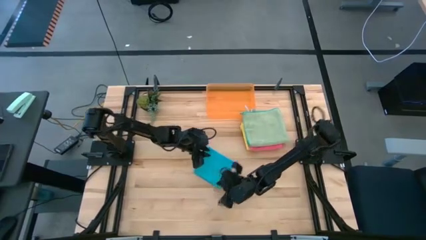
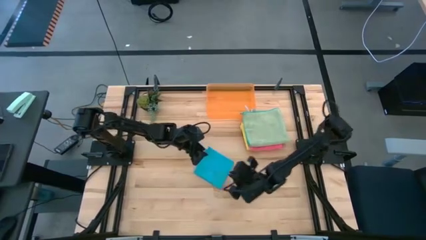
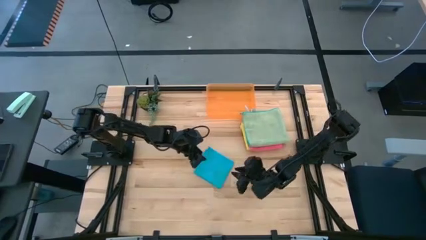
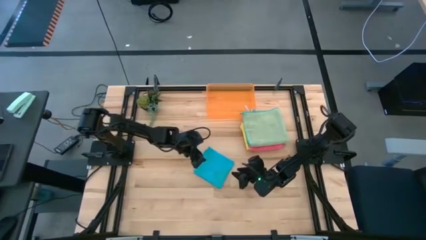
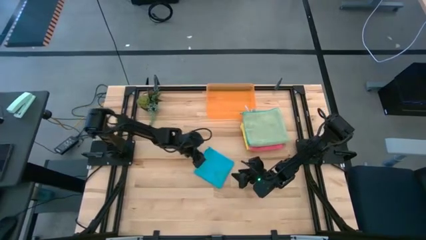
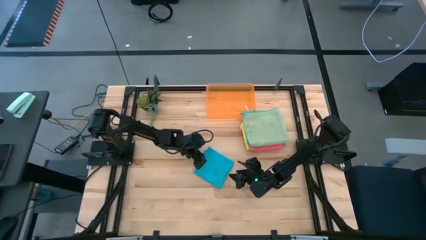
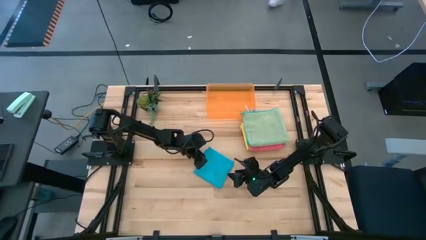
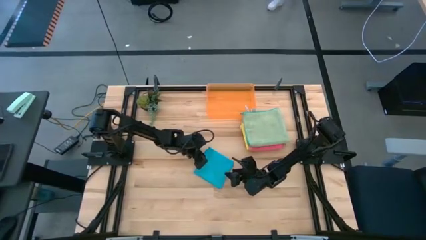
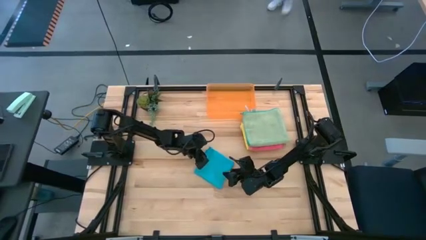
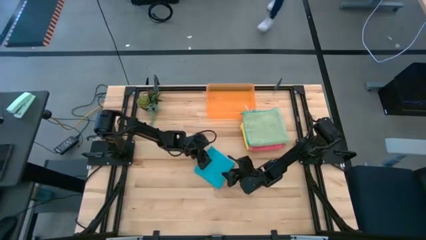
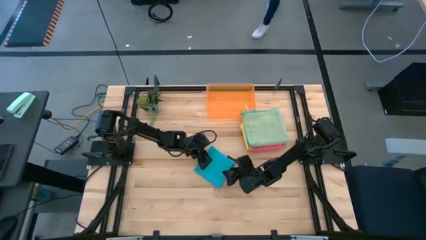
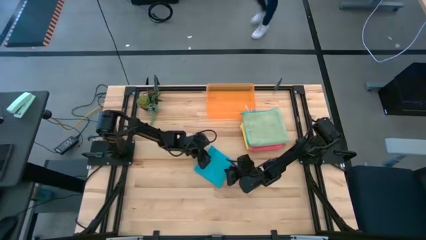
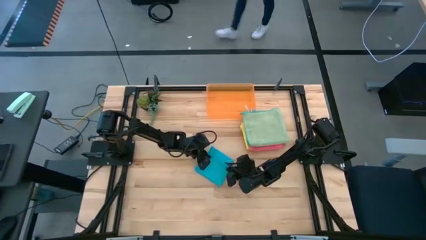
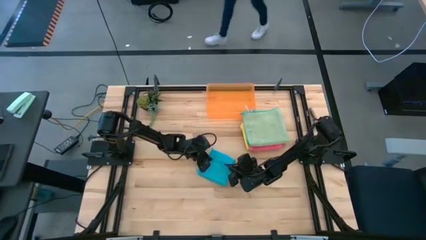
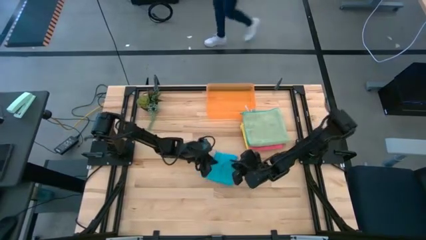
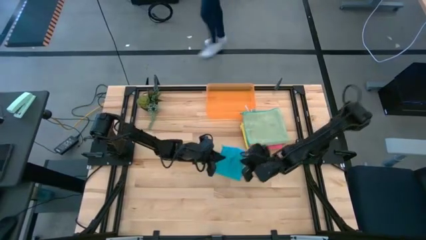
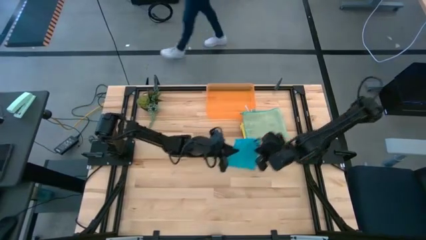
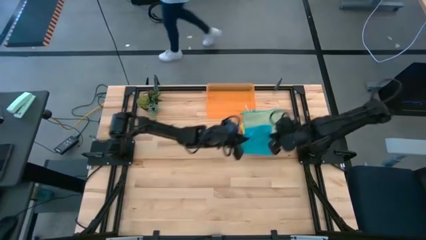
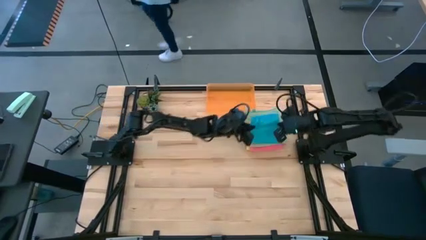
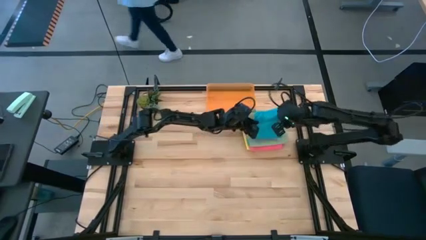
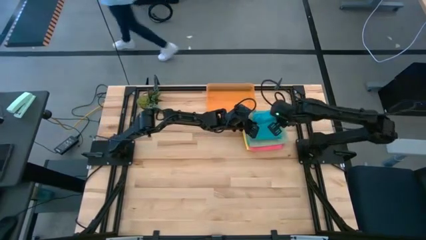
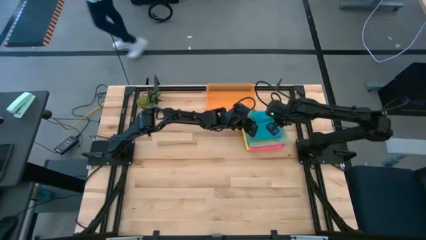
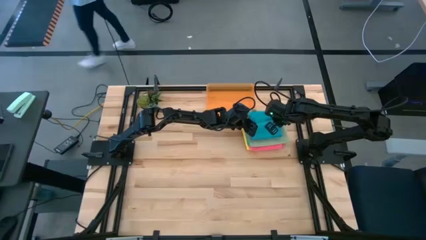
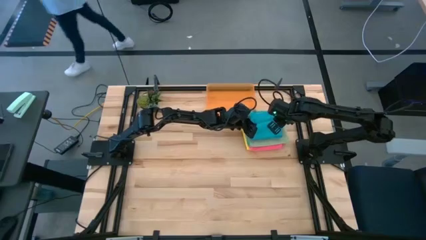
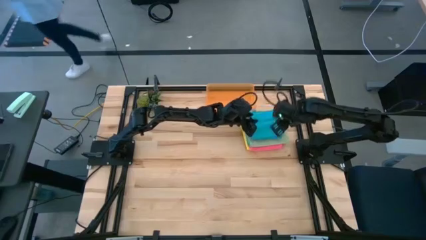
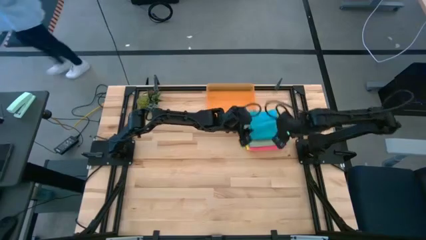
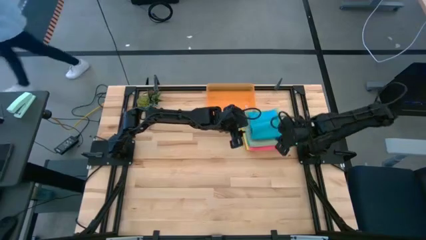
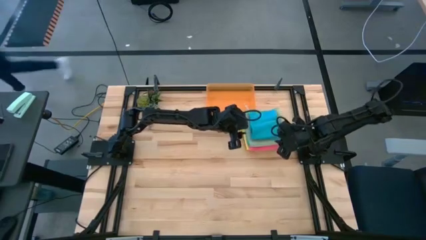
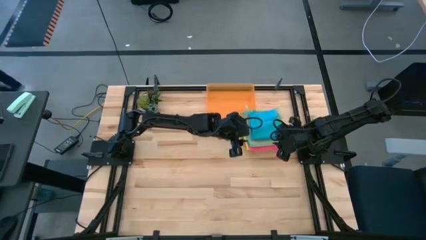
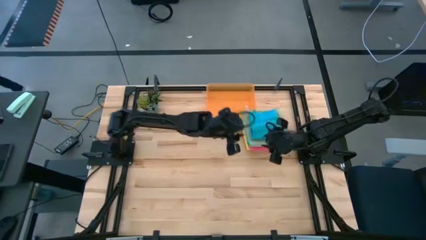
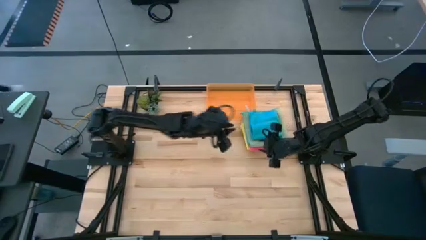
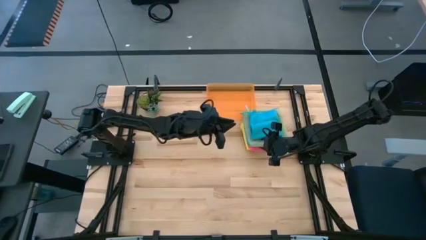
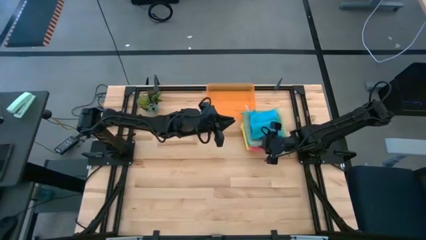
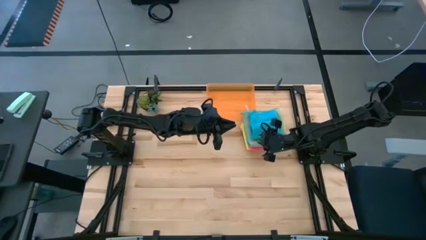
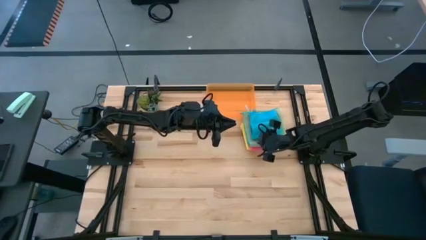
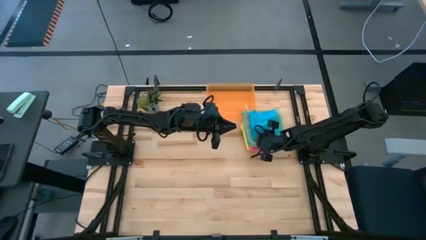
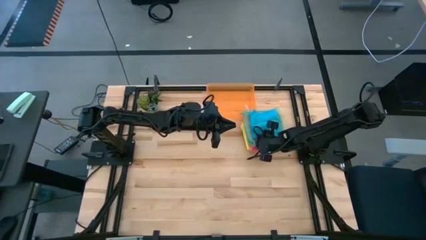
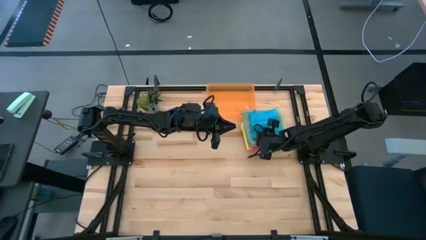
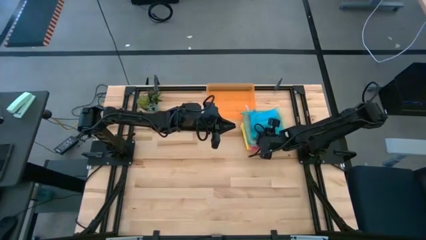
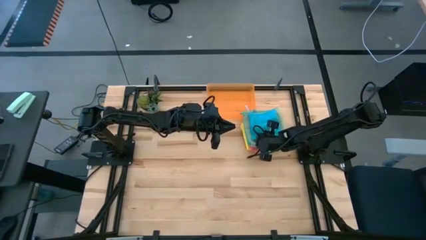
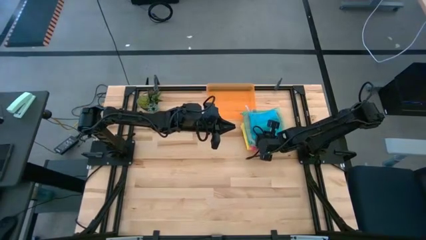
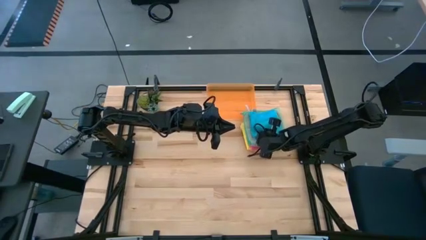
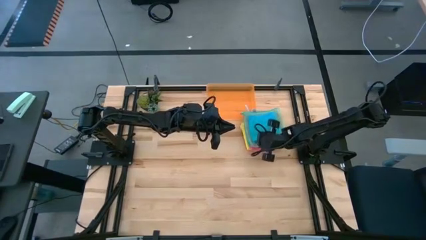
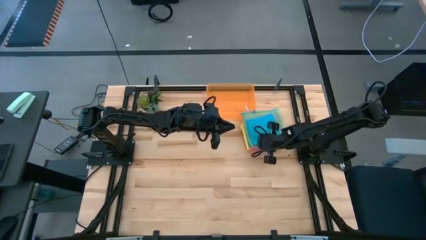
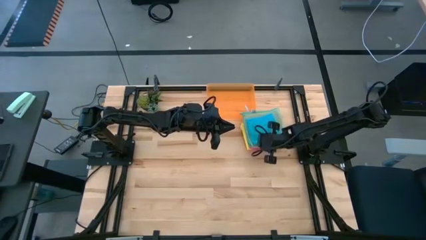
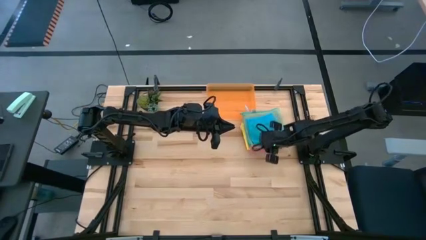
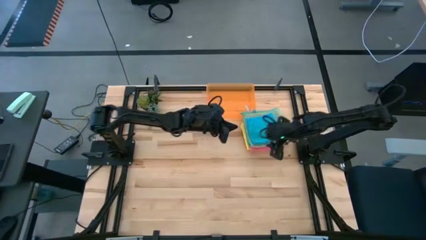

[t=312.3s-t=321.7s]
Task: Fold microfiber towels
Stack the blue microfiber cloth on top of the green microfiber cloth

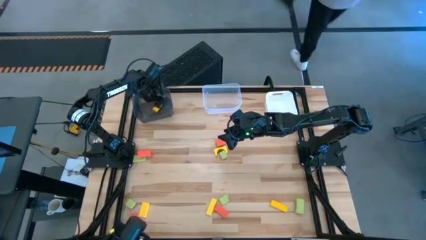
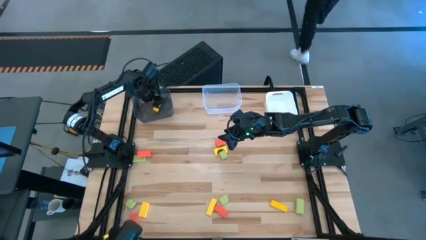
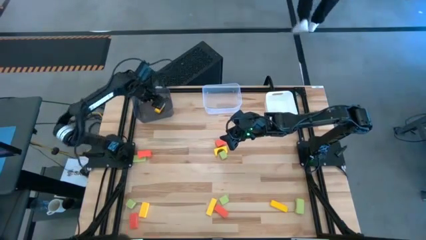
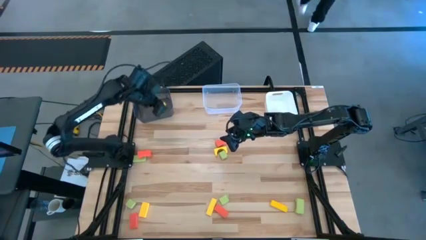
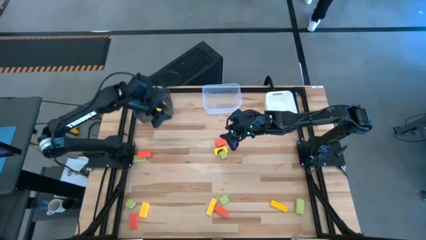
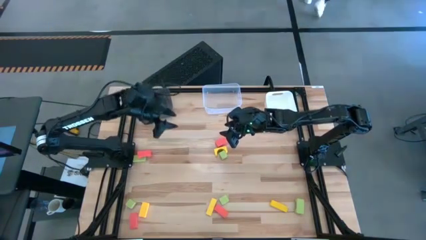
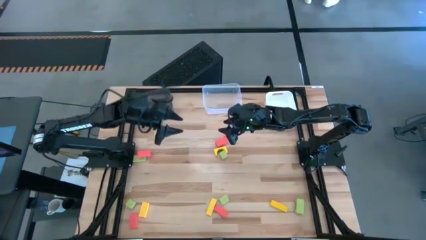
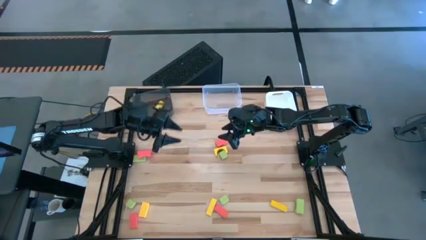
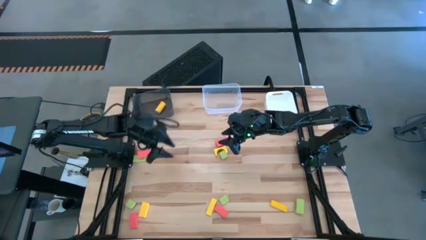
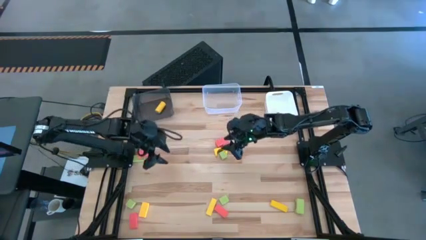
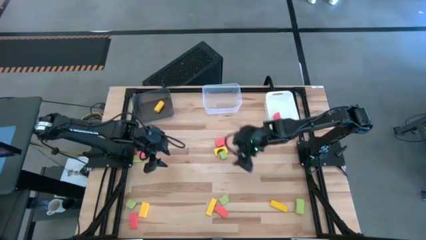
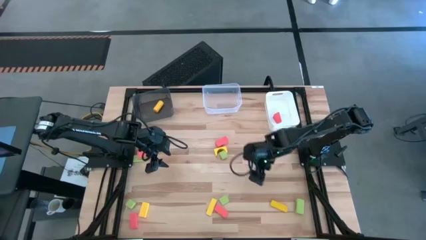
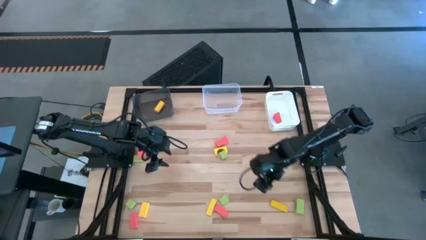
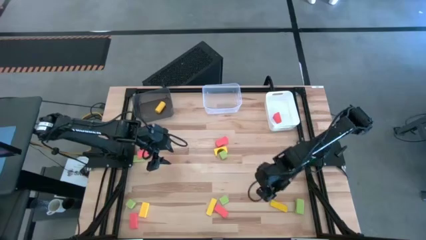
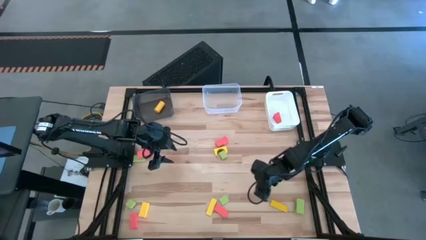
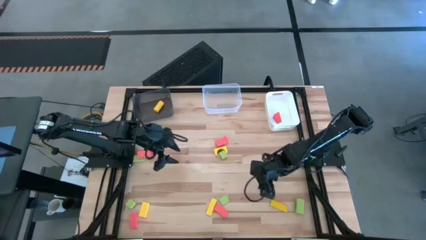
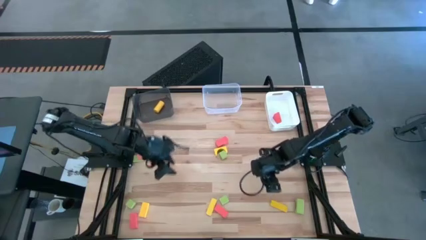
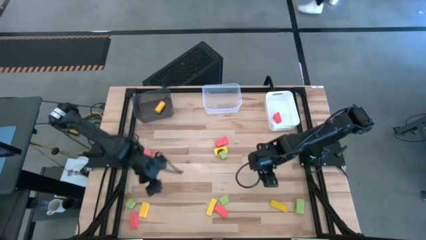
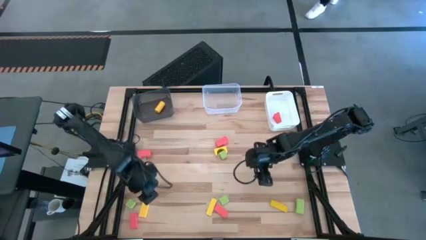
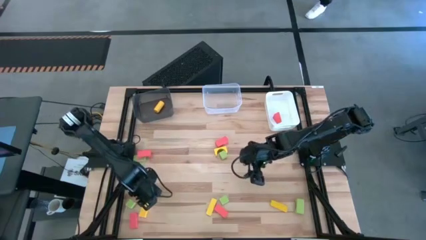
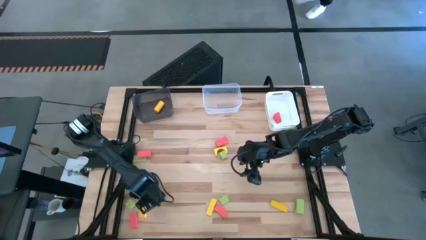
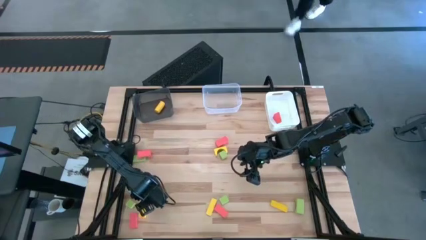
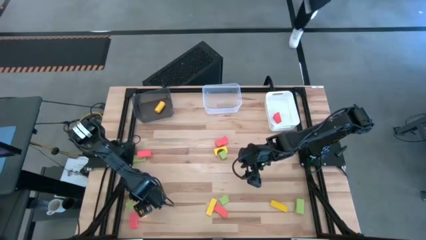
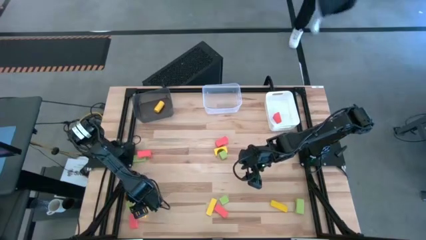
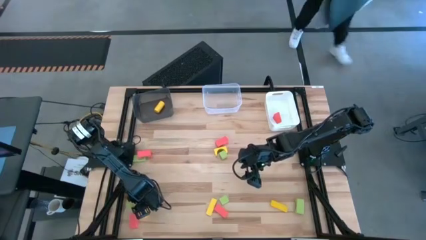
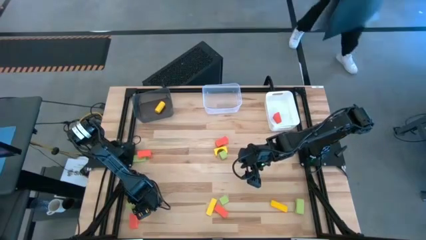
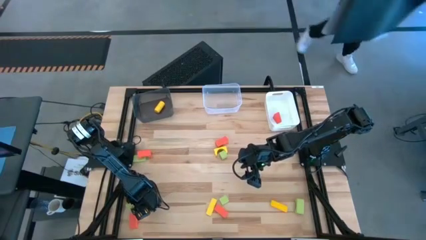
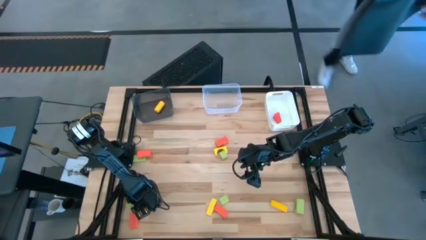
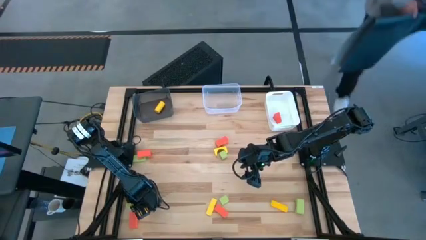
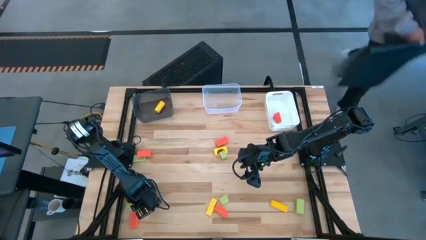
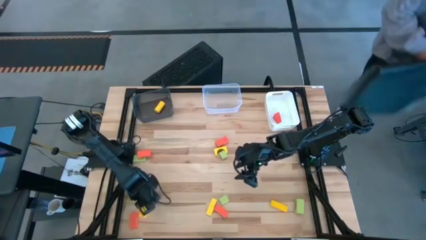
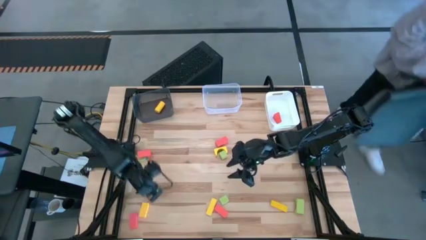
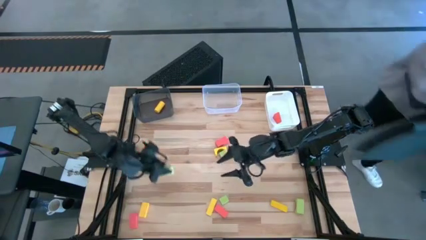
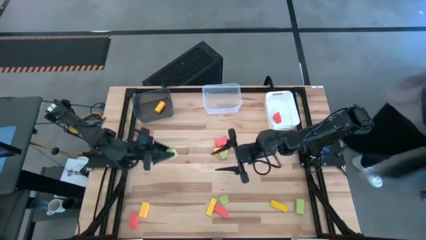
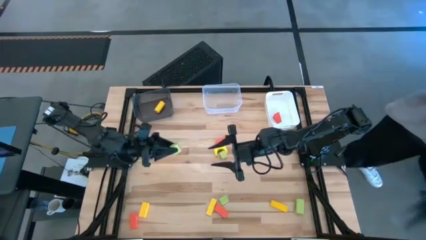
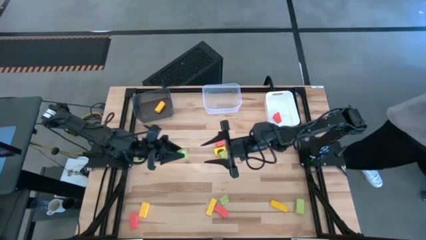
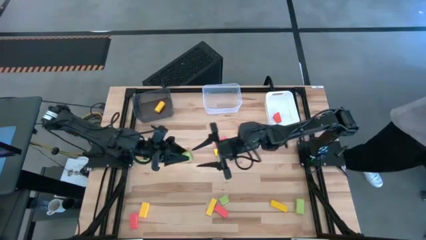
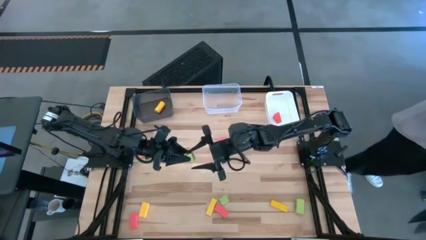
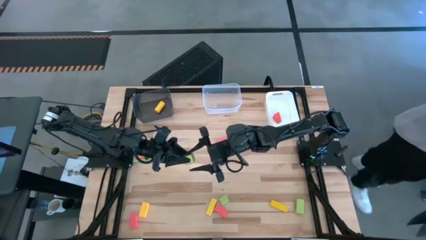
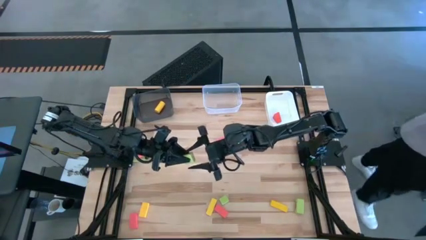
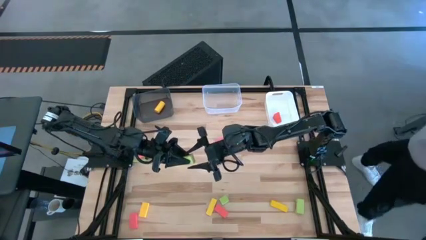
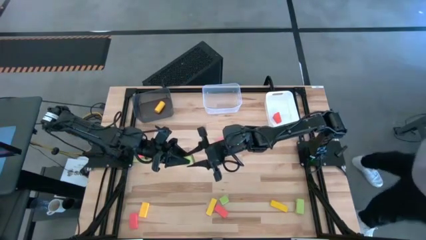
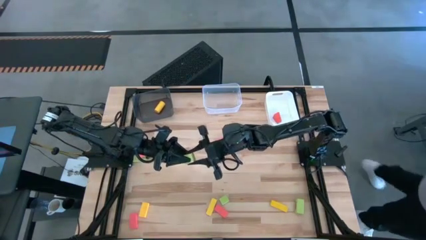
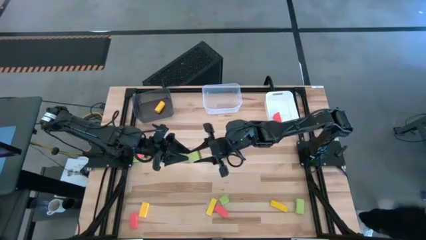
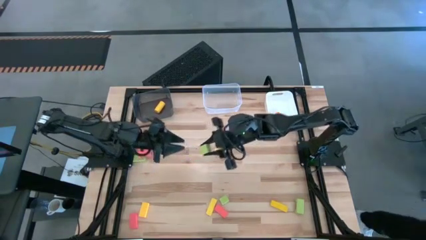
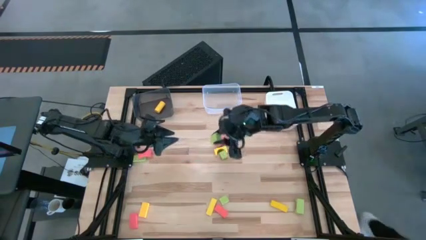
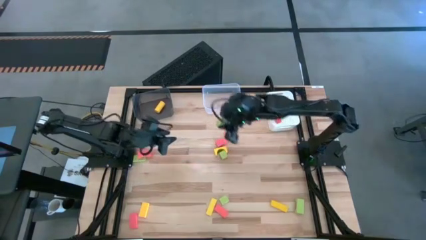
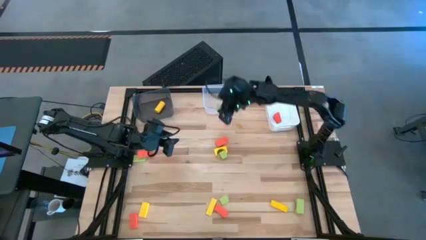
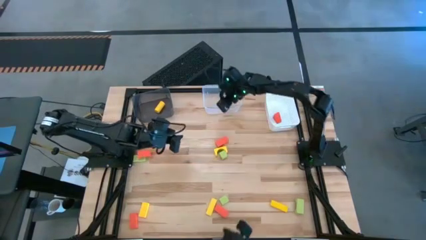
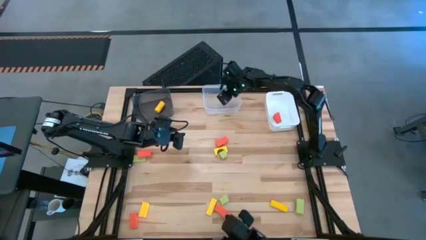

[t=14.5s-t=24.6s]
Task: Sort & place blocks by color
Put the green block into the transparent bin
